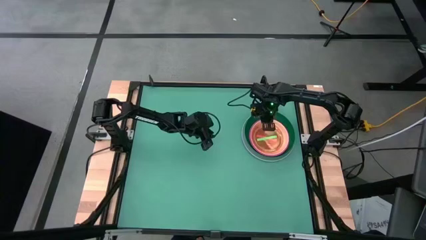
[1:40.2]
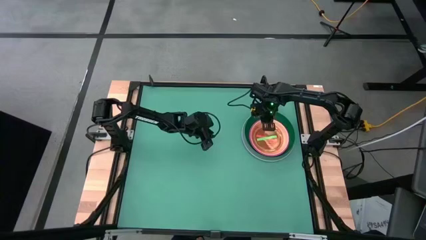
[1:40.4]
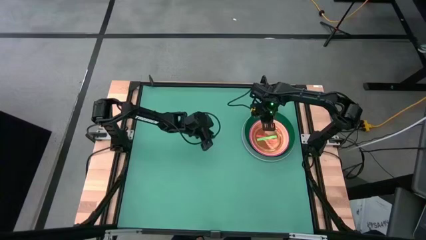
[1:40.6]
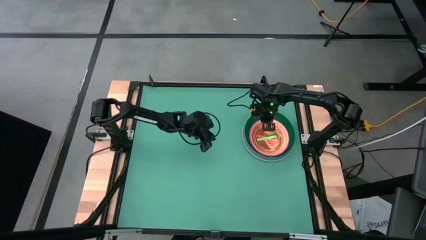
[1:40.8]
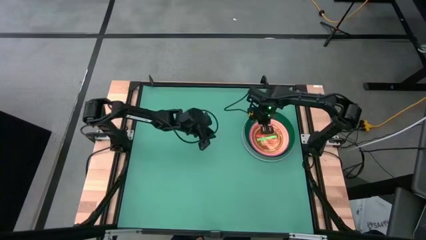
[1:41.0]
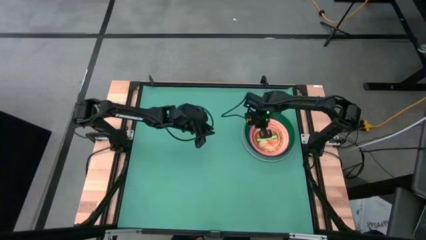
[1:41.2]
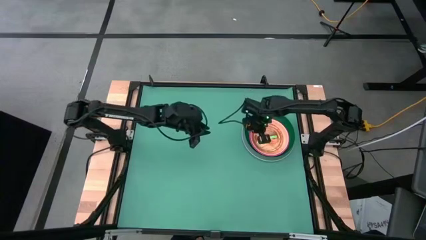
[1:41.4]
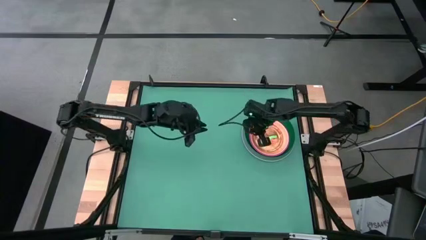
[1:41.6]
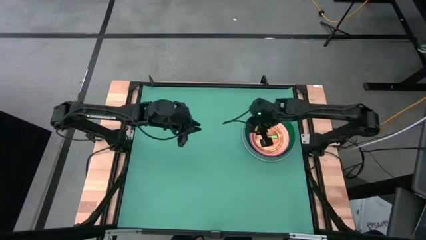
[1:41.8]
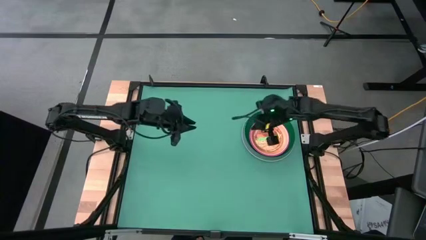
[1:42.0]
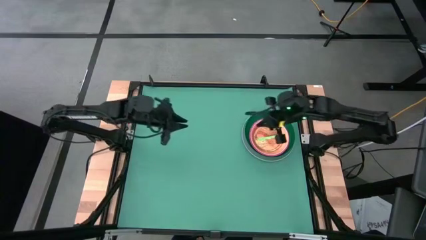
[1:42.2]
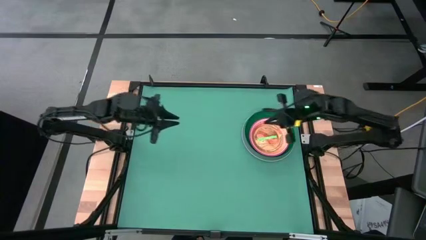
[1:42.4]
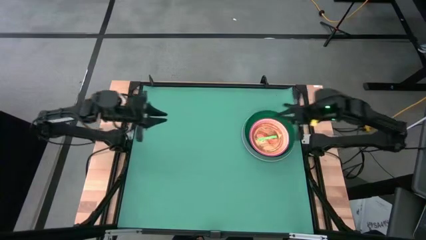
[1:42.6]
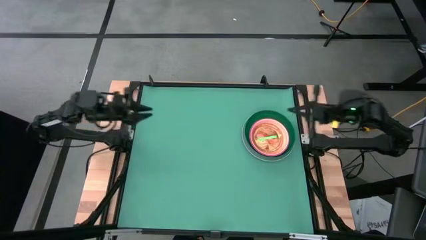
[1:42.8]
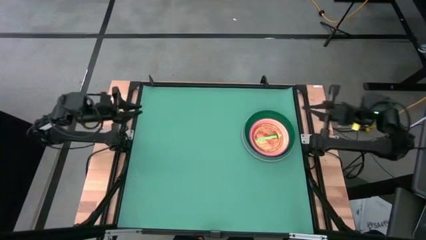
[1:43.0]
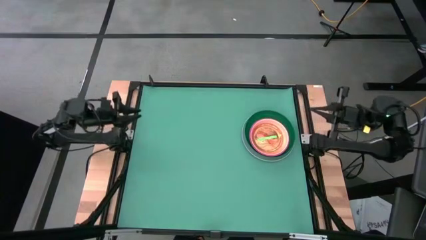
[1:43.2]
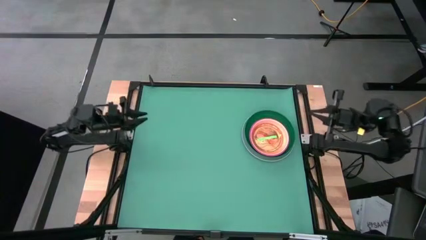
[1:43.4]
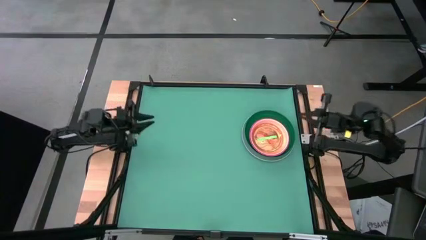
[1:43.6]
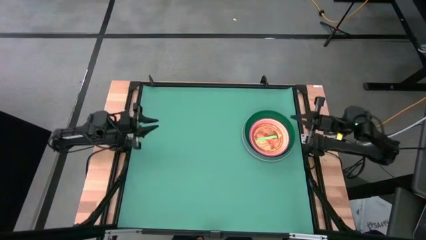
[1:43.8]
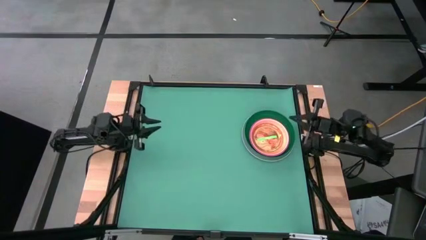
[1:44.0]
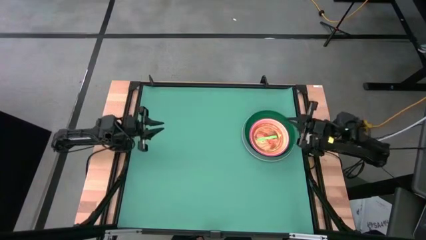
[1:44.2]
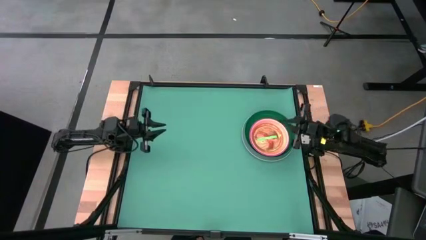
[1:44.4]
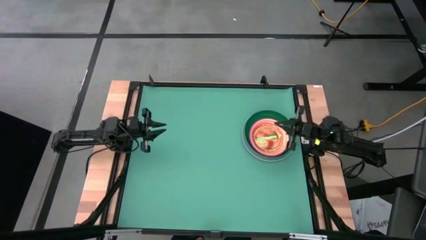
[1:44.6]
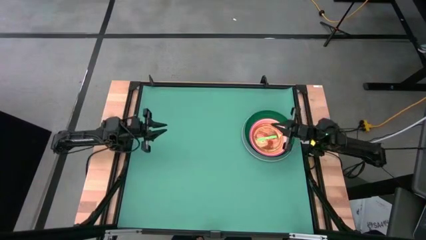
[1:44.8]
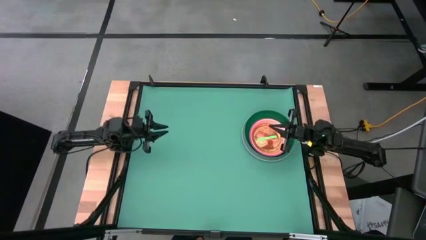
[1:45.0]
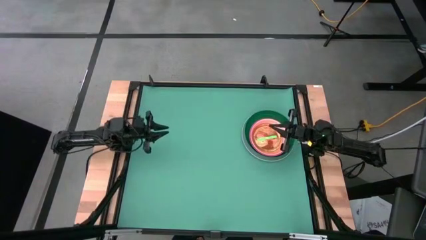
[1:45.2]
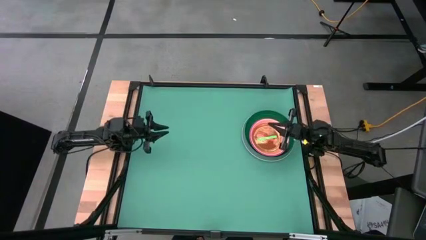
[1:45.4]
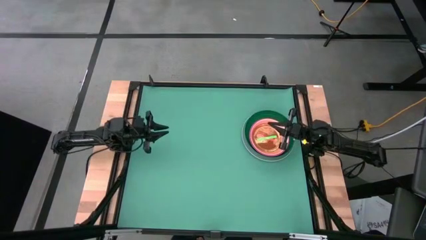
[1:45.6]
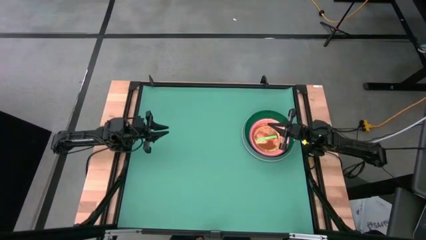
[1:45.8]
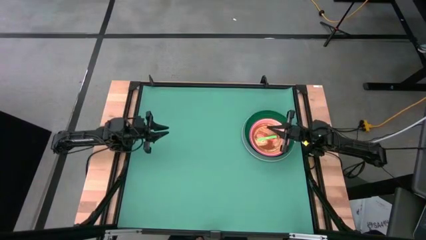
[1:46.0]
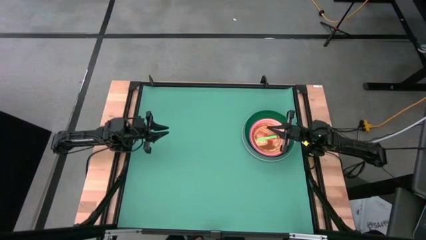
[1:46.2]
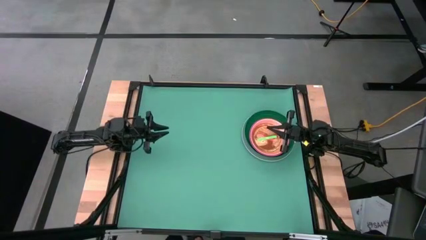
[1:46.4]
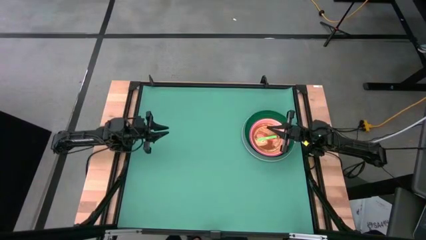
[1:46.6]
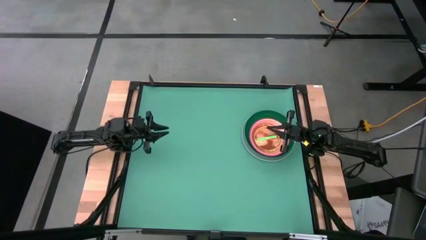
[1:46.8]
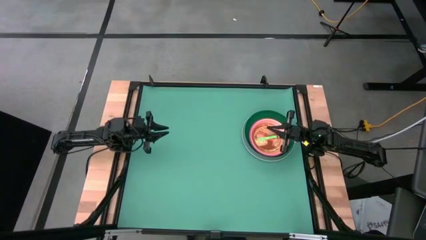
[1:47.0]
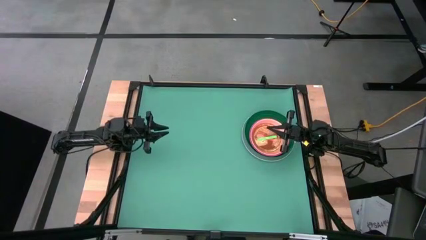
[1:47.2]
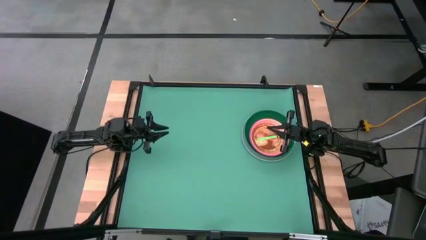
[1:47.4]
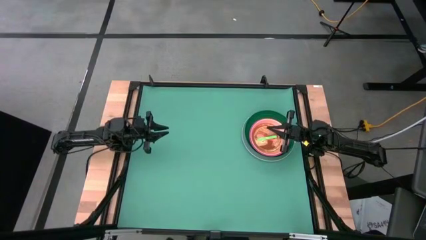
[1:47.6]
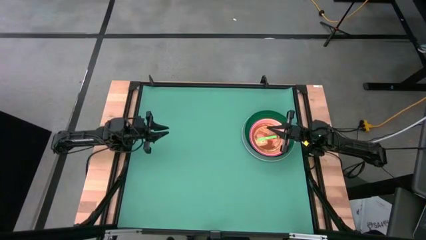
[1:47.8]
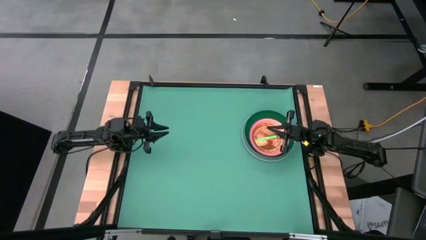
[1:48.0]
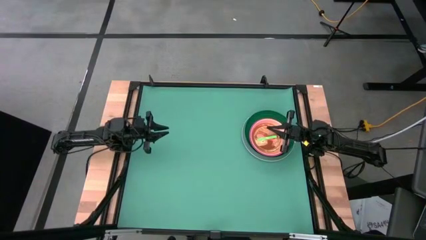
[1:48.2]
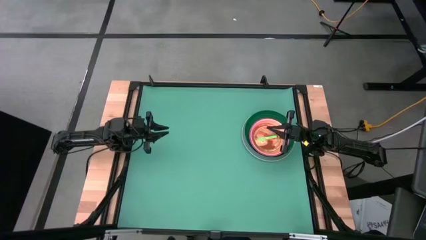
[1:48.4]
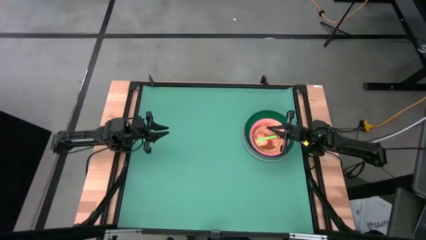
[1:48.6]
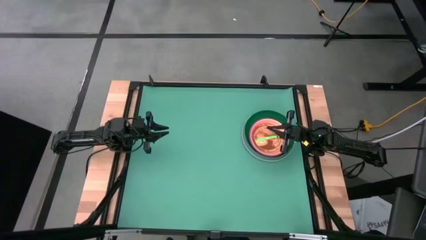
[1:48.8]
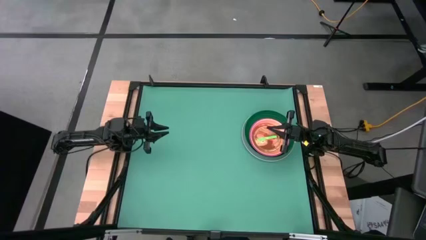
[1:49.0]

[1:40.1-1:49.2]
Task: Stack plastic plates
Return to Home Position

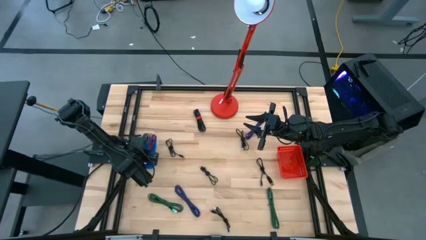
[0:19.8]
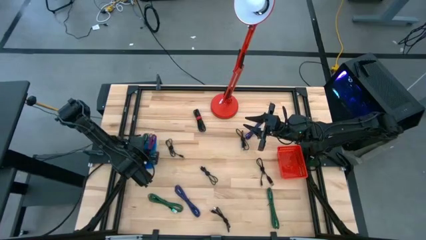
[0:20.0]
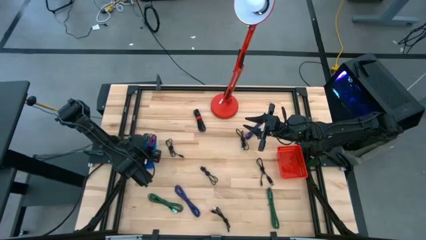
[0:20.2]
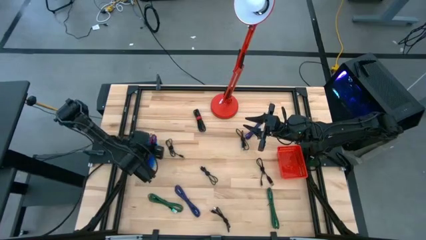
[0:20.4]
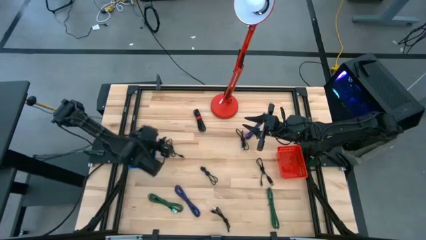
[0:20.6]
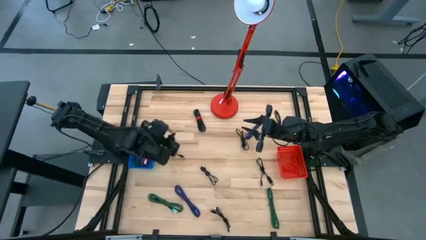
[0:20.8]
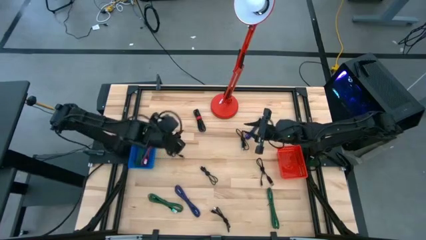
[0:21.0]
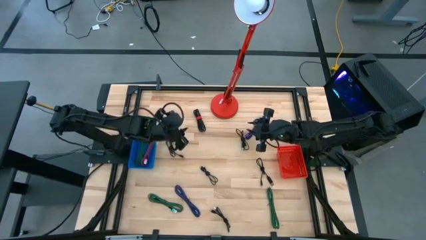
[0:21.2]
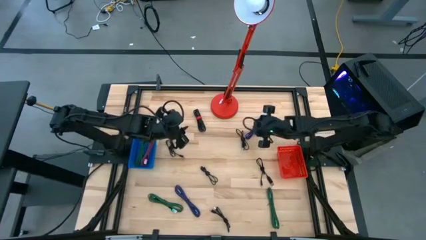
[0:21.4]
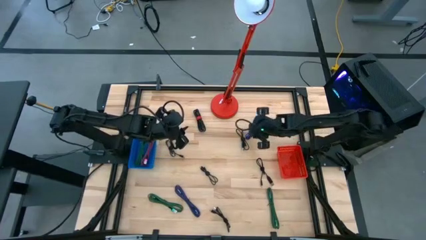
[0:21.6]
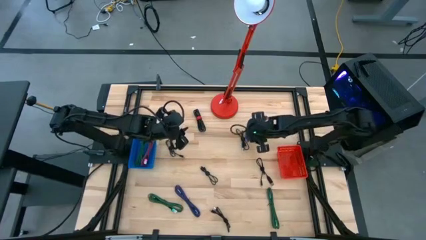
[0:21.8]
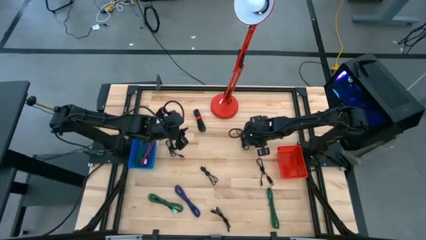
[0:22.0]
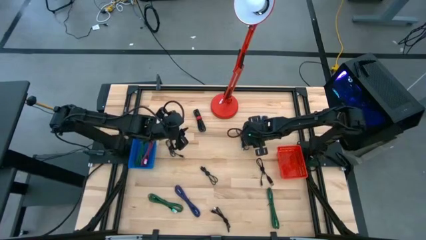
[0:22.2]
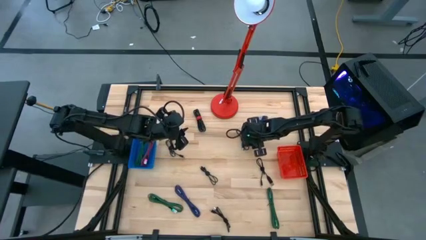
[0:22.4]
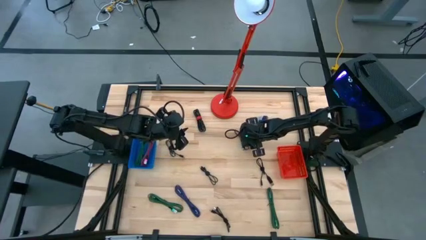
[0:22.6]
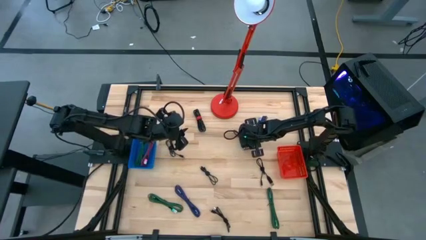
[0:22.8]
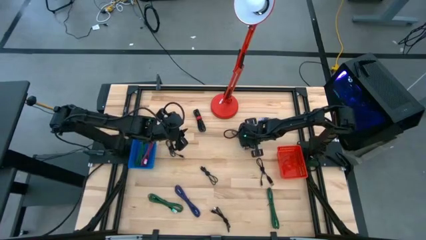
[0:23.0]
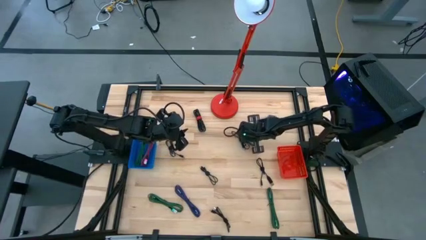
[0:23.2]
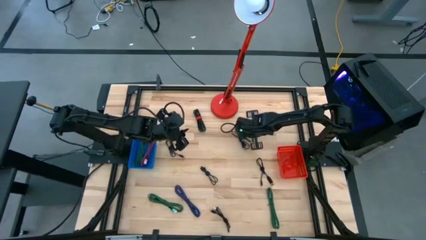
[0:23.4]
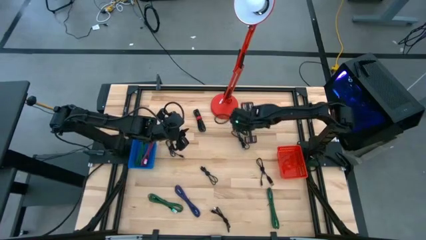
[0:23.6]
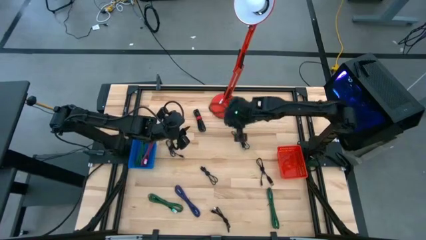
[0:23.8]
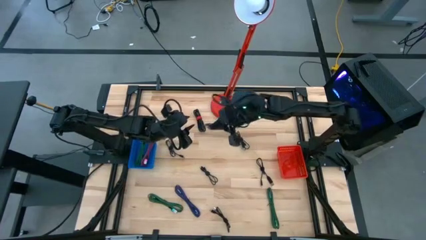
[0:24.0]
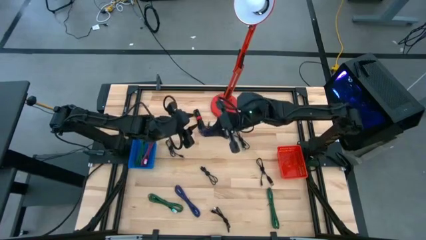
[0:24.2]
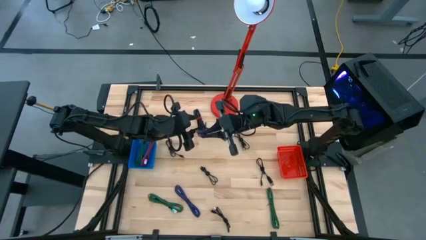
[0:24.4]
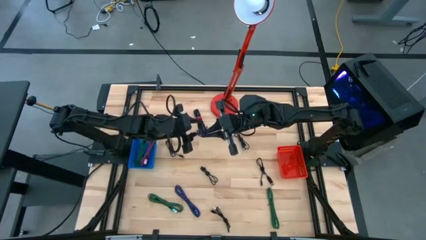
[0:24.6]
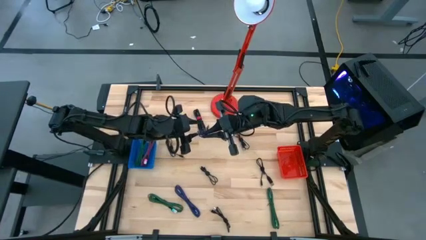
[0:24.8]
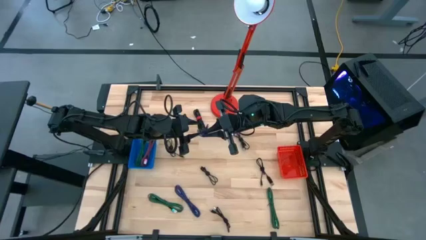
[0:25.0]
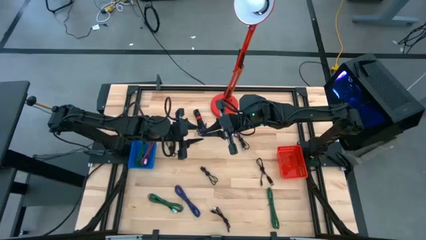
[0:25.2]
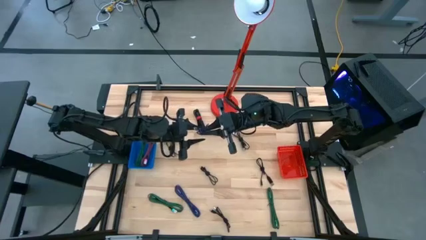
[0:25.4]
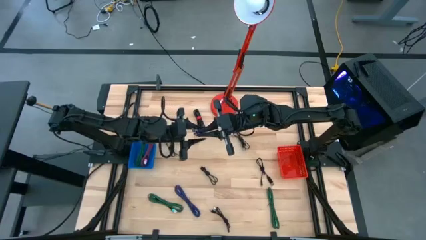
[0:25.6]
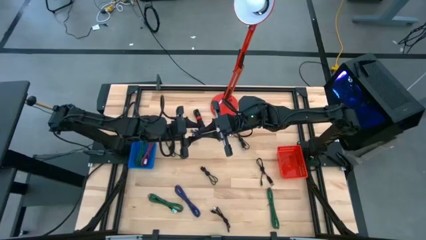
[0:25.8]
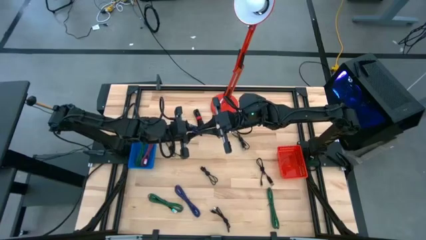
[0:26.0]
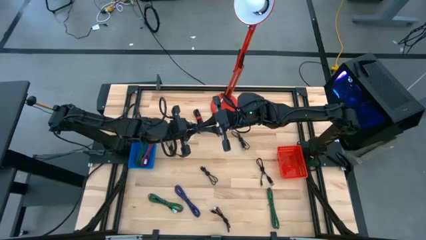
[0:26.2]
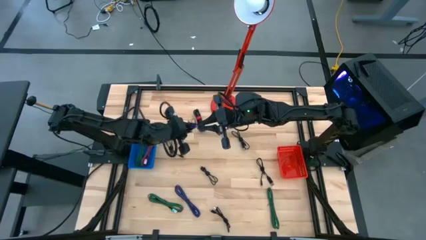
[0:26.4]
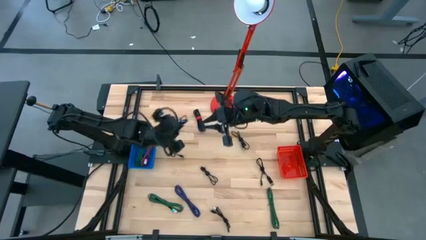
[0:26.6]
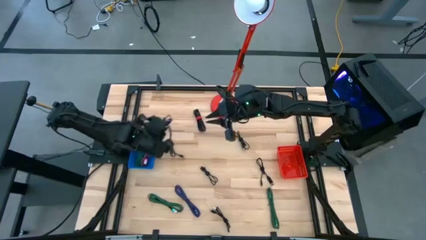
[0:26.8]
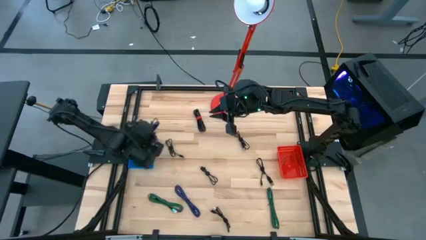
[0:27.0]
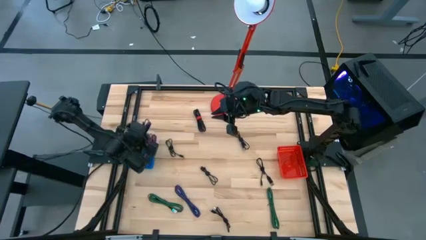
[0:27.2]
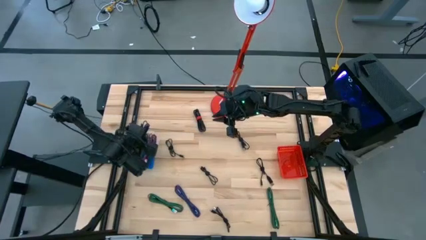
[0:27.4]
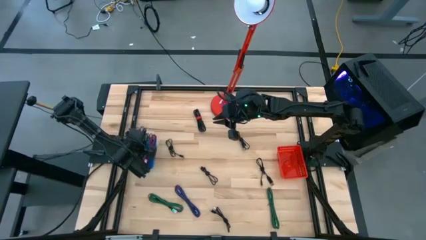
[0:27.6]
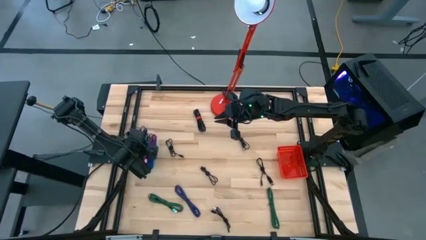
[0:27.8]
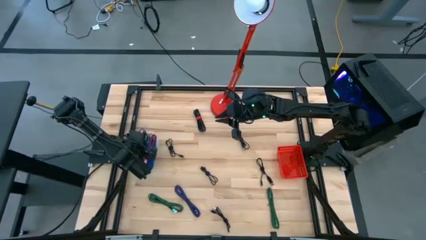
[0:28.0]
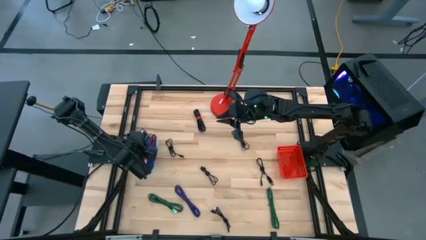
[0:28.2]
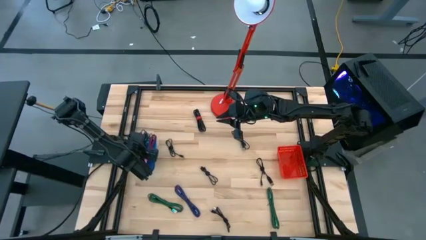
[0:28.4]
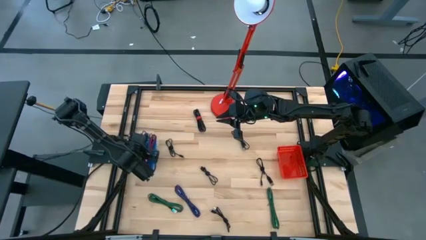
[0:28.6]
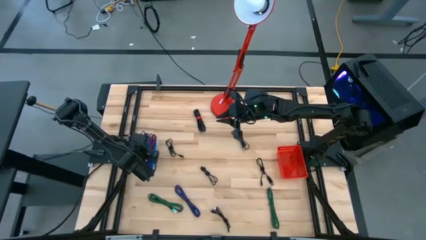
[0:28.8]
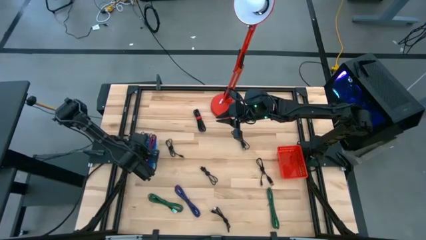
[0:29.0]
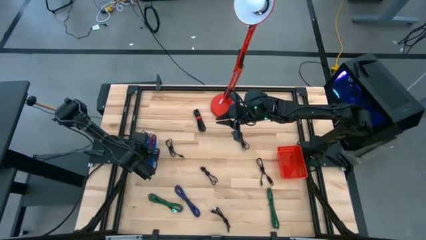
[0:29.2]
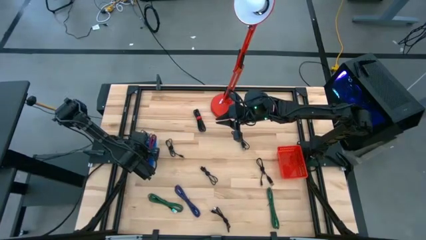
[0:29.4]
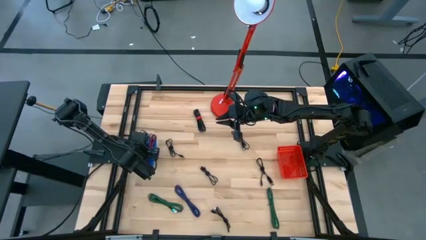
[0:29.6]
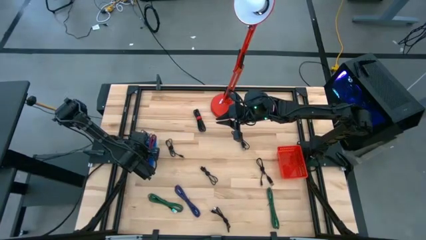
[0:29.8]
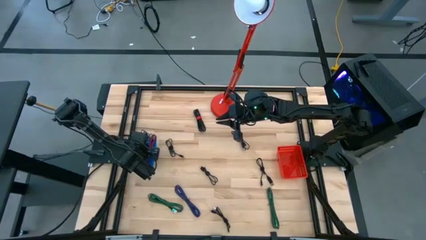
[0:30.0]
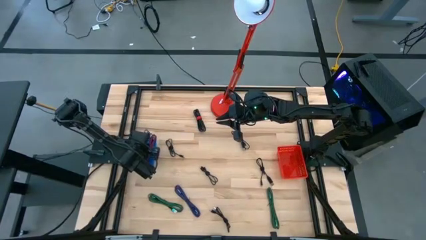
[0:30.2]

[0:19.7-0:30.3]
Task: Pick & Place USB Port
Put the blue and black charger cable into the blue bin
